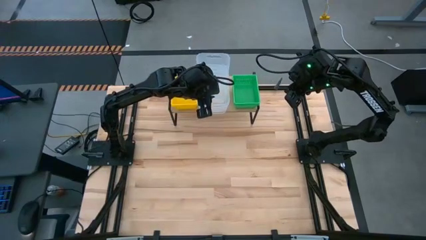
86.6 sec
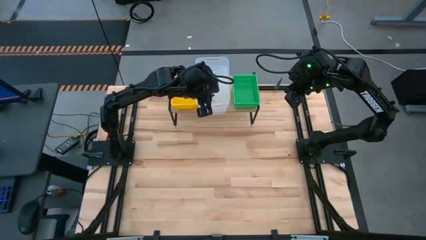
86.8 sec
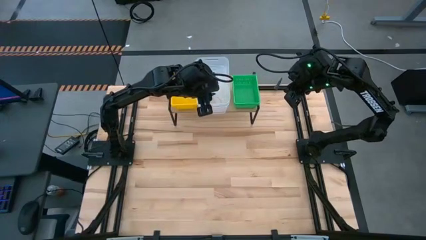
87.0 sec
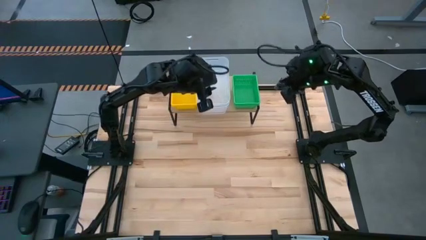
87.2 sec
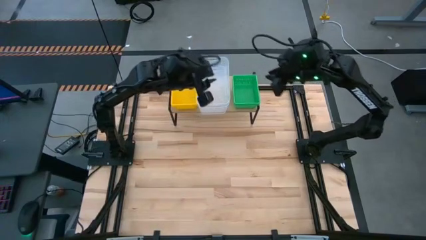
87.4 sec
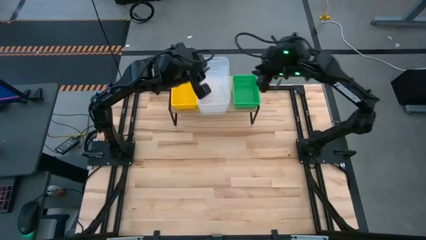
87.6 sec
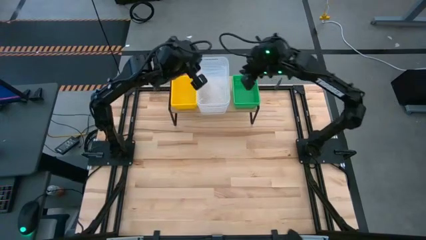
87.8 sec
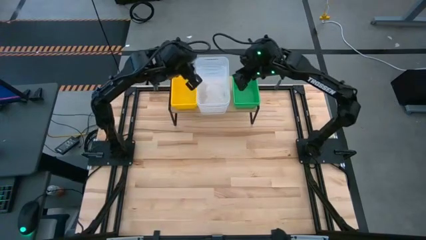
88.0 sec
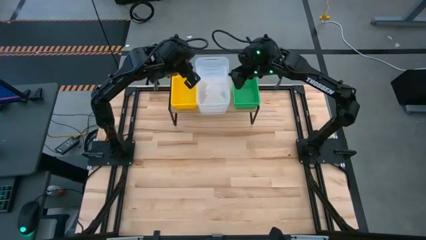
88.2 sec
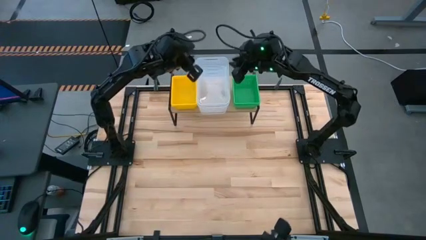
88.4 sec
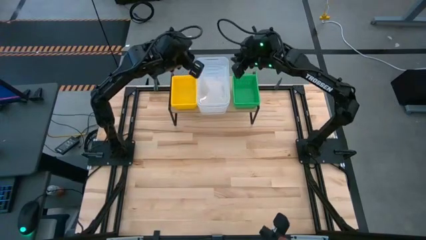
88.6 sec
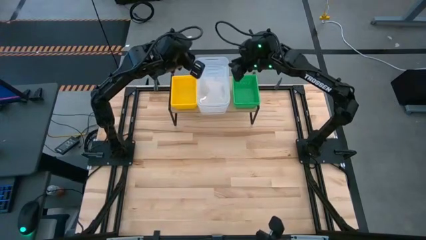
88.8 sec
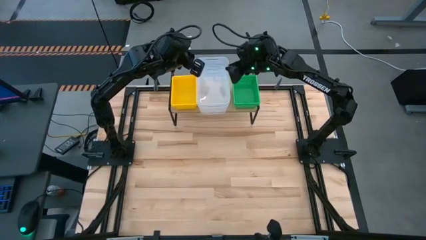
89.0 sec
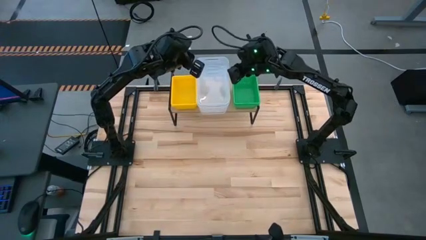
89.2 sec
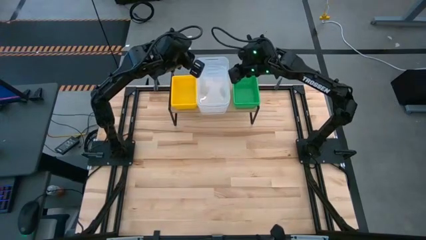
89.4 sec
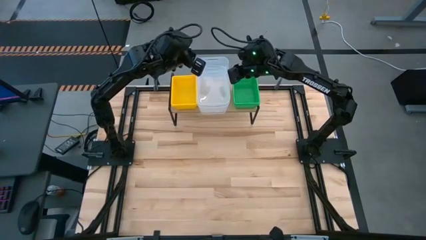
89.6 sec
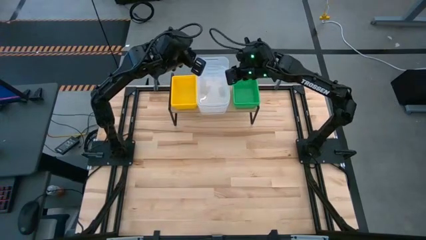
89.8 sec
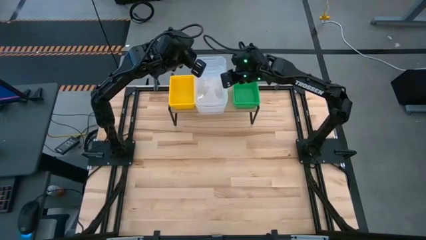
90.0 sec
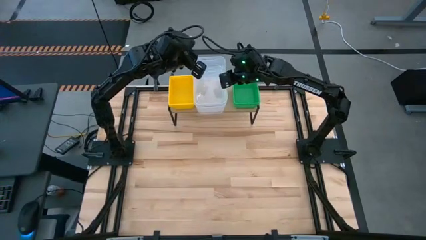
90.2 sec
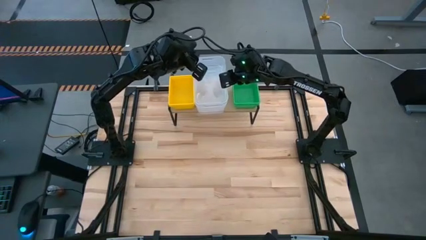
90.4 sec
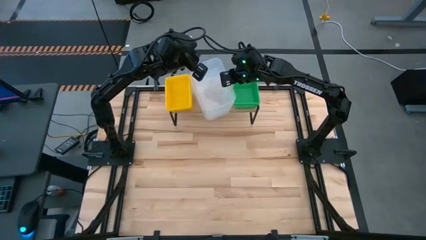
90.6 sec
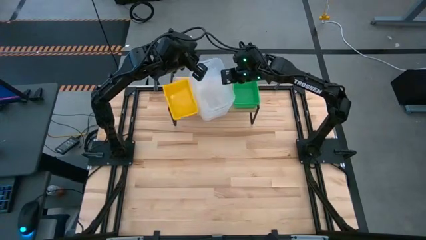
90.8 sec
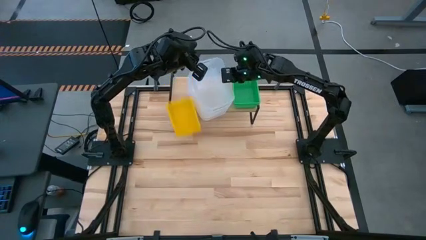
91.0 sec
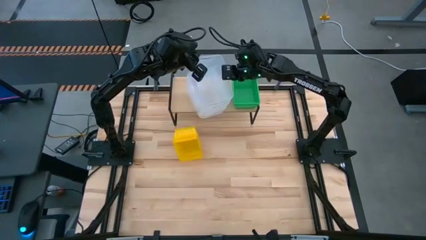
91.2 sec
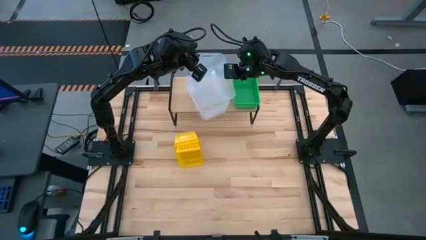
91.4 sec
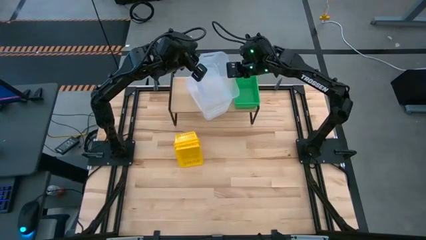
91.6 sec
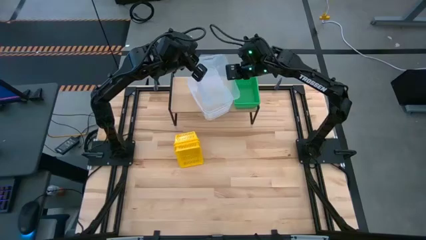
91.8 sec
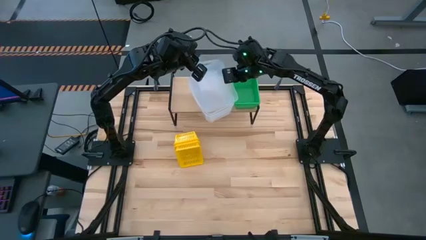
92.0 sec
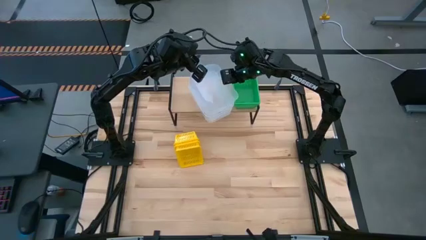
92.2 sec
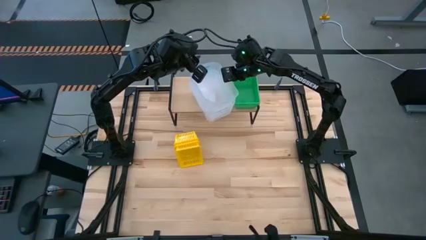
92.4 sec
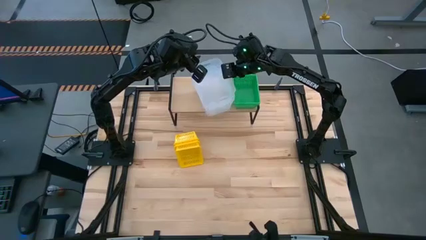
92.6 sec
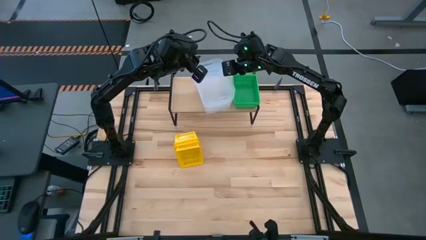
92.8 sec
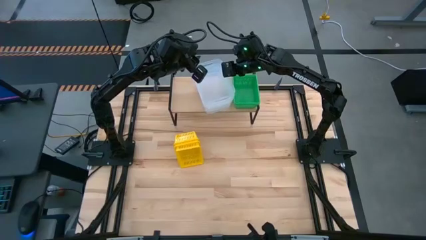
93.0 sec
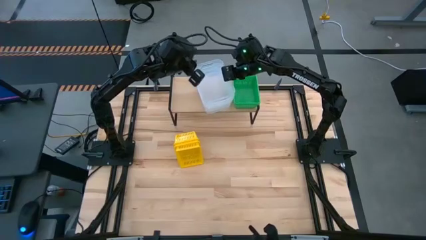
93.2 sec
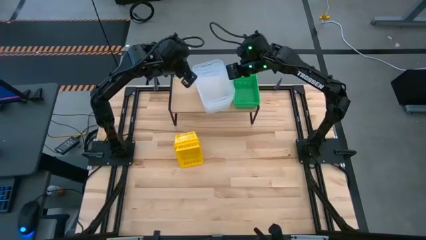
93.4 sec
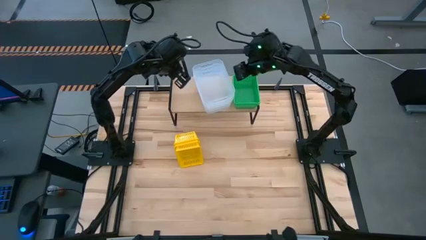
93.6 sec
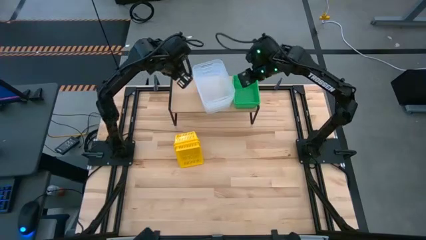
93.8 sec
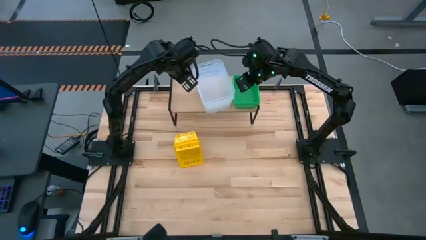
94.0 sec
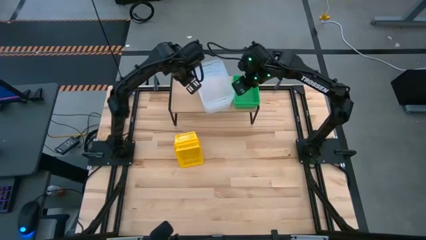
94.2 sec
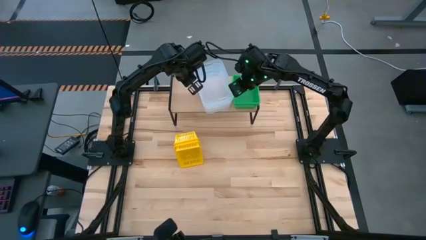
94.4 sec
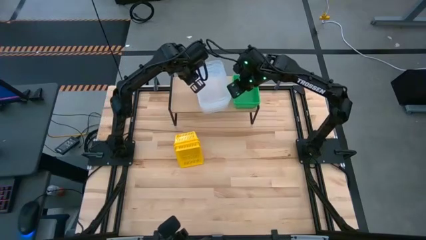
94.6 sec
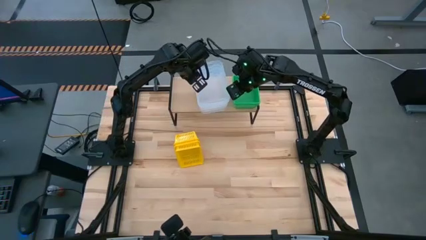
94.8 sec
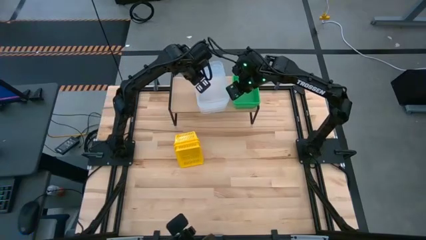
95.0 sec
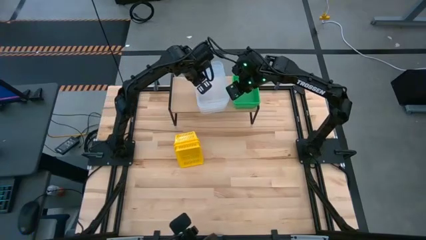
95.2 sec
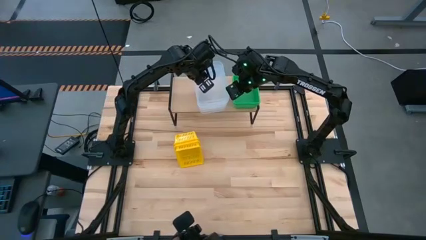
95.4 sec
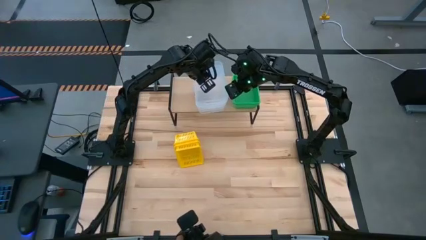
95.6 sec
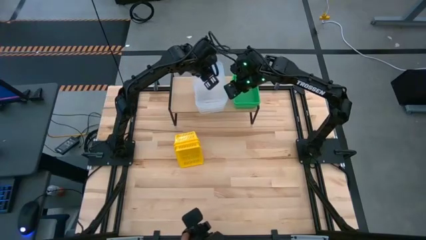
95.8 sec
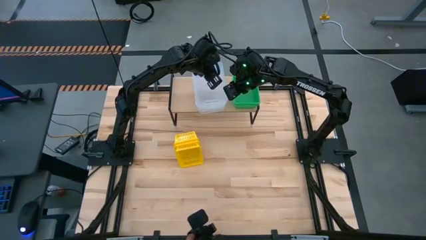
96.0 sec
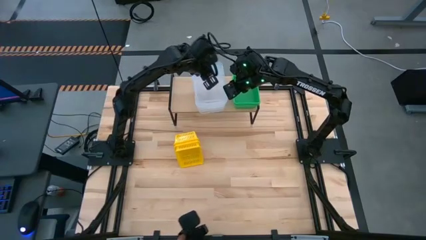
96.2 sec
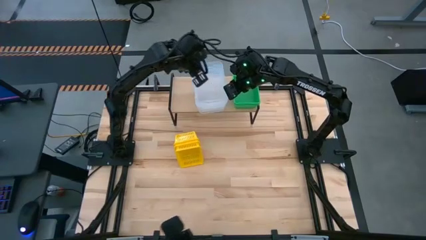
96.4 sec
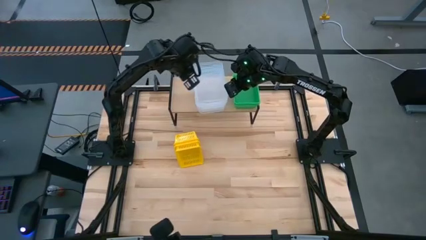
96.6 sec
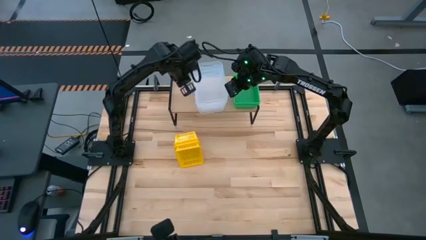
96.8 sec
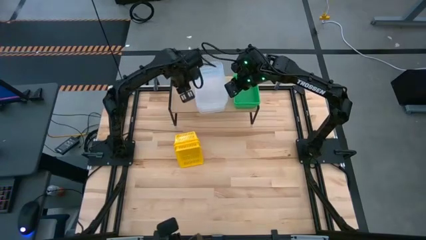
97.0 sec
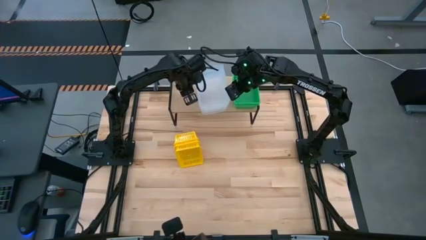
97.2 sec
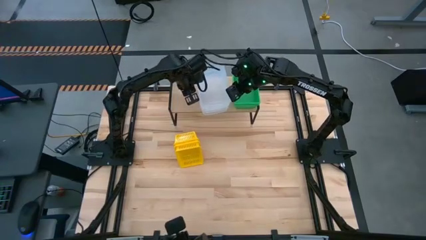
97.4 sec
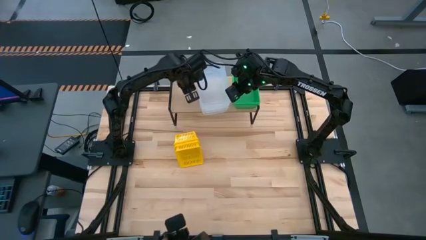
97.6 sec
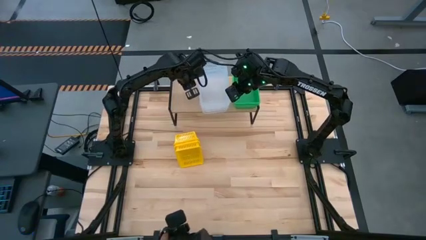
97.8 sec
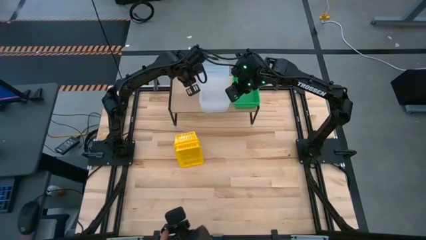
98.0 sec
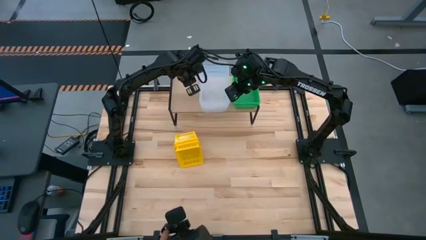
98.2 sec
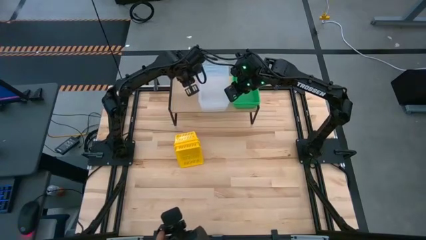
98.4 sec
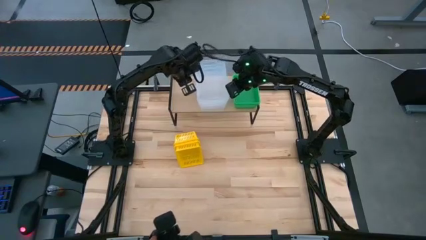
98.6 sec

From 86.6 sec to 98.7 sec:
Task: Stack baskets on shelf by color
Adjust the stacked transparent bins on the shelf

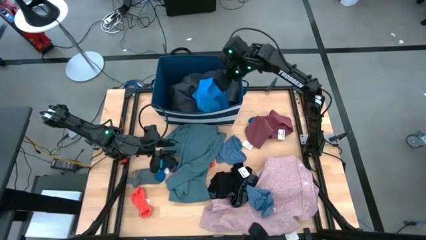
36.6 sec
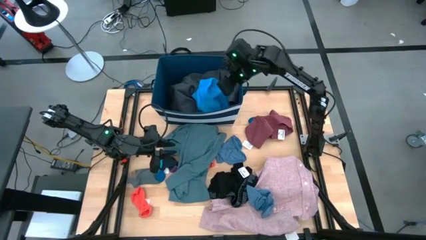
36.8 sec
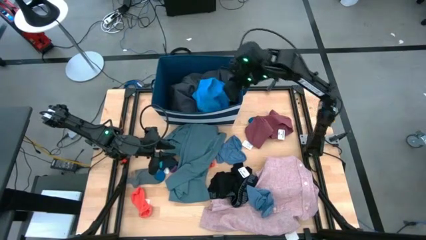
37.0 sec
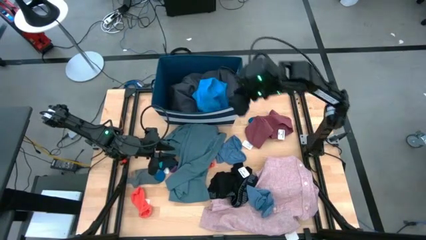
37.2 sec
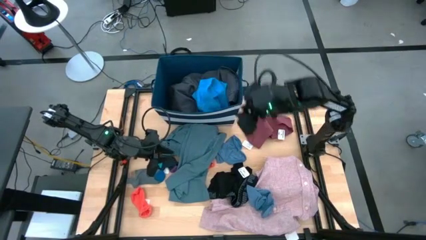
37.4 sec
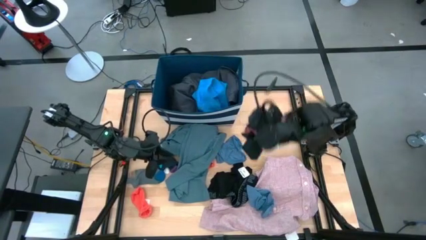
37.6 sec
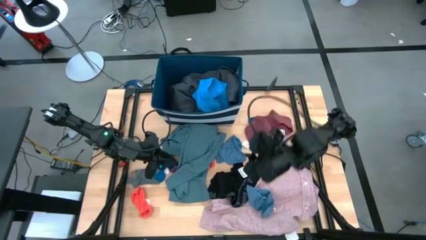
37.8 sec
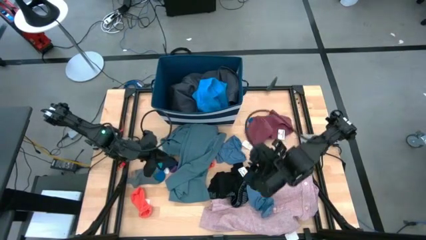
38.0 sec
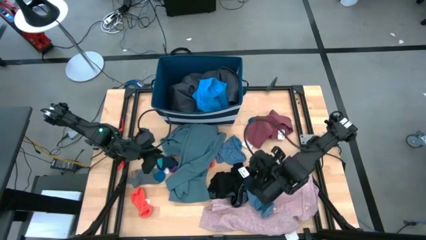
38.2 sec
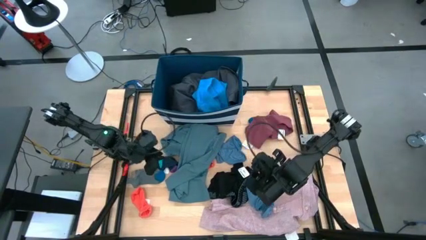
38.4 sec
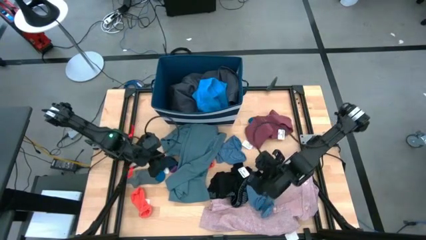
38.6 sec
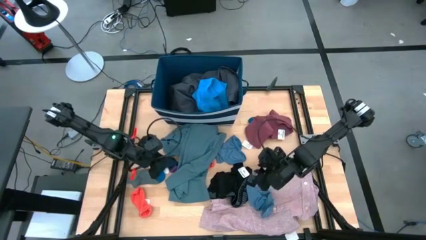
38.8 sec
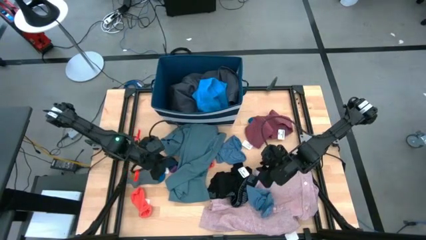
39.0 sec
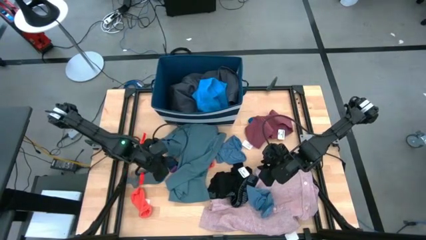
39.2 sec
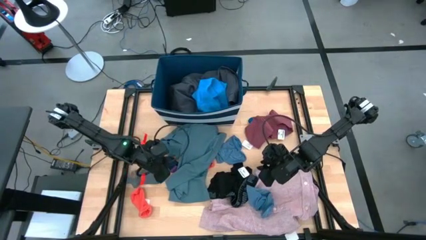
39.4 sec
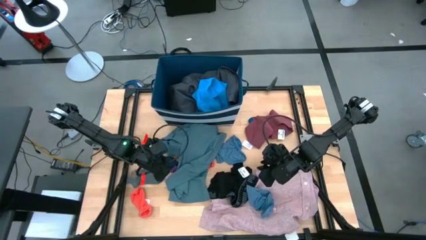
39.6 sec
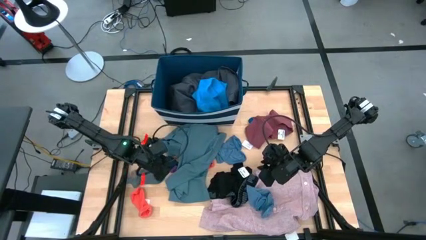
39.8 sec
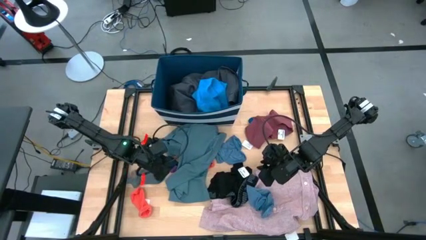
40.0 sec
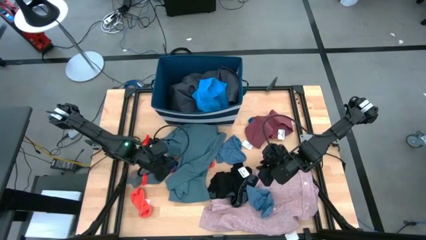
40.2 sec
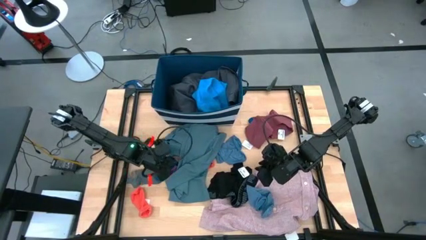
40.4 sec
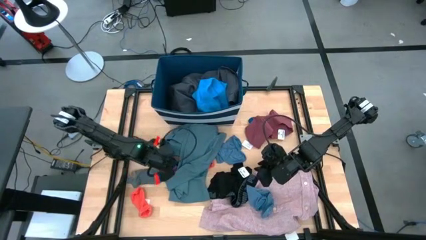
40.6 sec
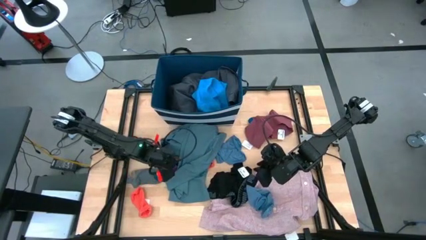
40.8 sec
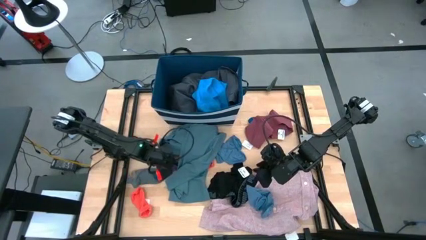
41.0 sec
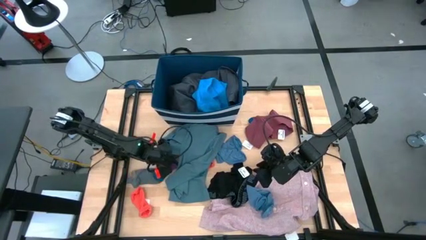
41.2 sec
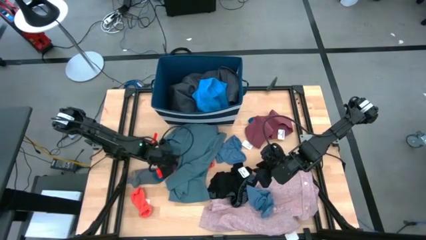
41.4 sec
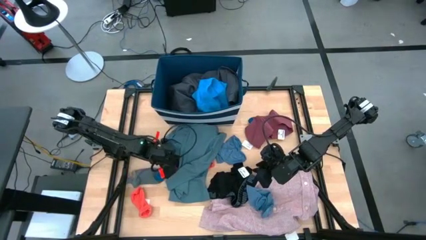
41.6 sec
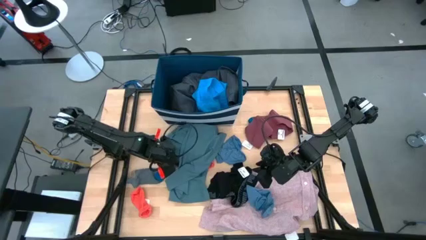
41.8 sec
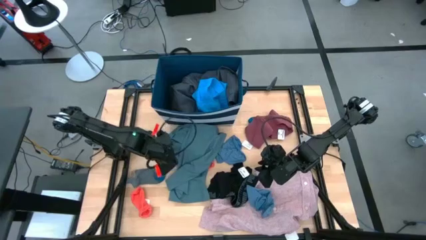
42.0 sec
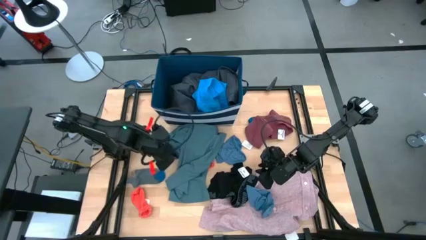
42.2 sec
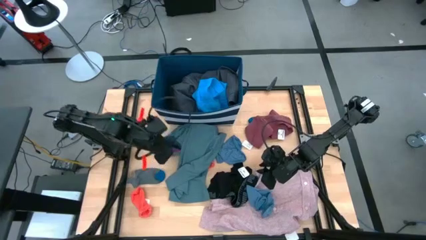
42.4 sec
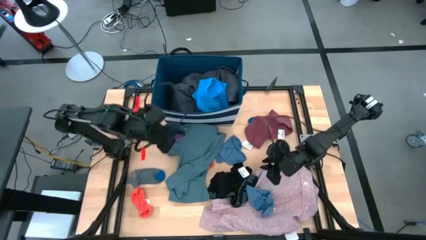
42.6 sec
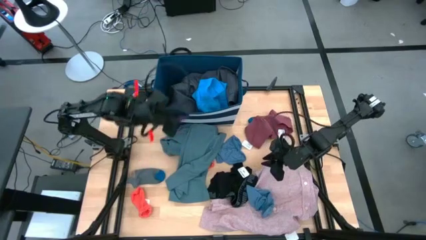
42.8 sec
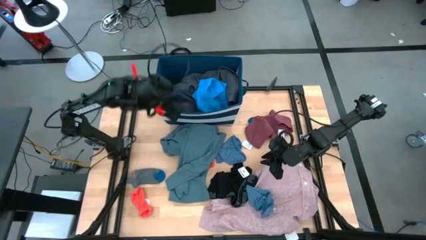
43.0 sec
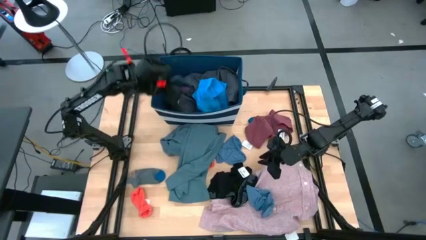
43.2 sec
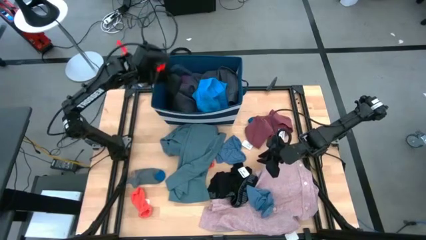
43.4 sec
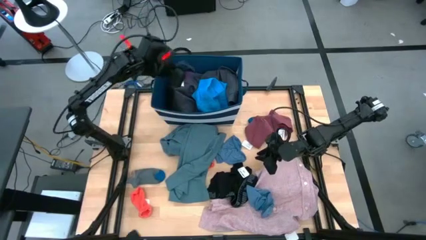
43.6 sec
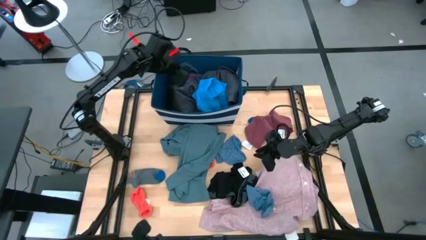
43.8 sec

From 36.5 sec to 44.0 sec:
Task: Sort clothes
Put the dark blue sock into the blue bin
